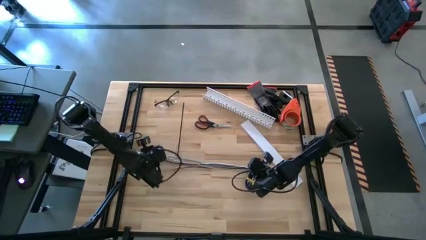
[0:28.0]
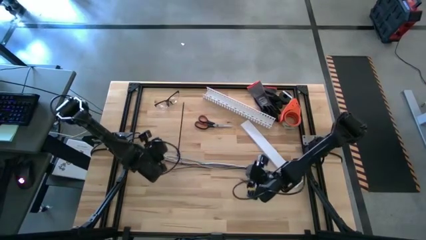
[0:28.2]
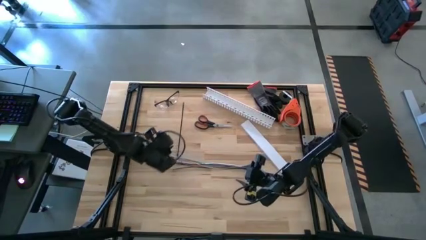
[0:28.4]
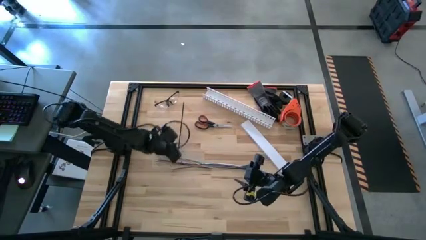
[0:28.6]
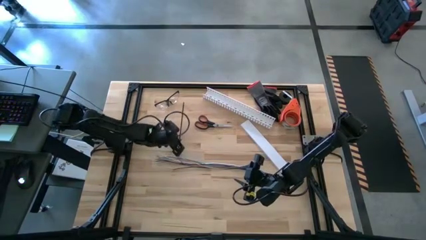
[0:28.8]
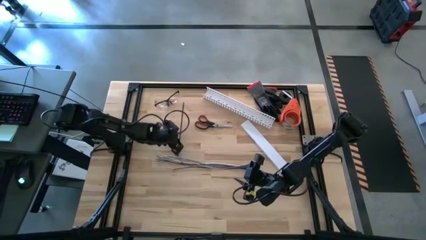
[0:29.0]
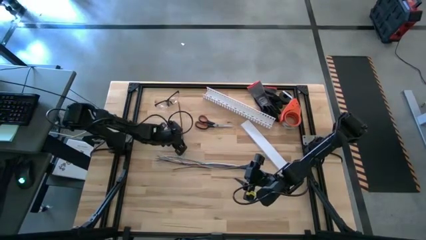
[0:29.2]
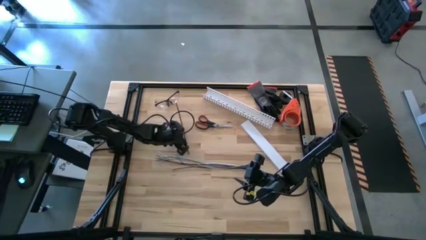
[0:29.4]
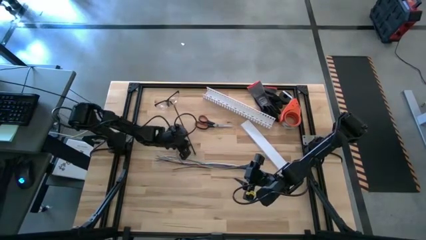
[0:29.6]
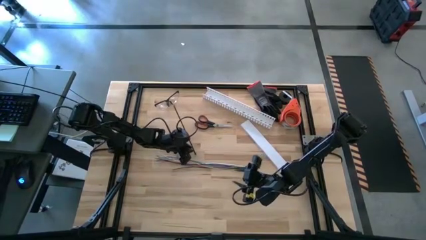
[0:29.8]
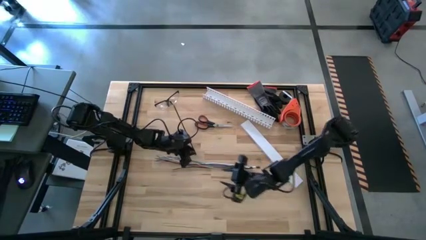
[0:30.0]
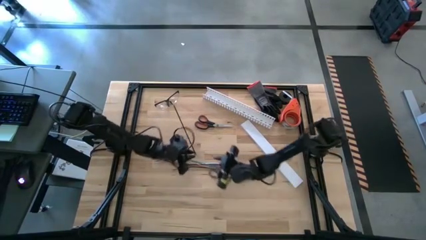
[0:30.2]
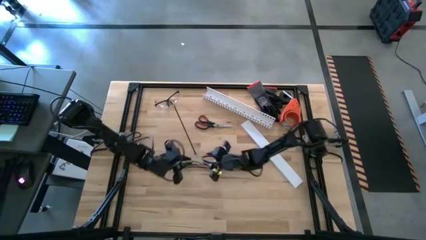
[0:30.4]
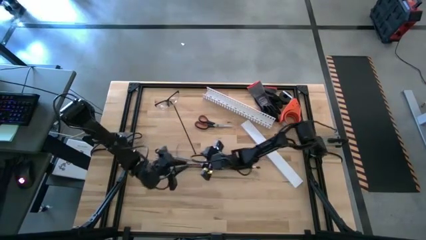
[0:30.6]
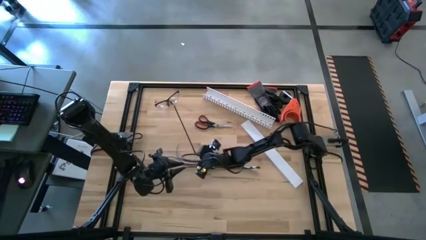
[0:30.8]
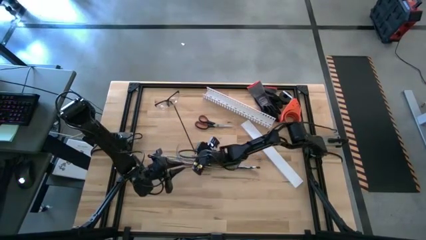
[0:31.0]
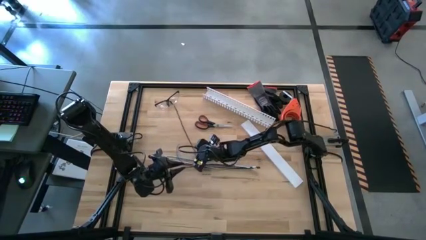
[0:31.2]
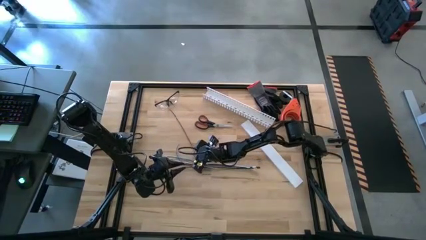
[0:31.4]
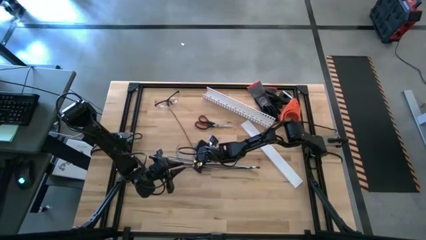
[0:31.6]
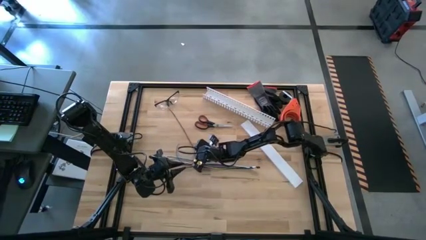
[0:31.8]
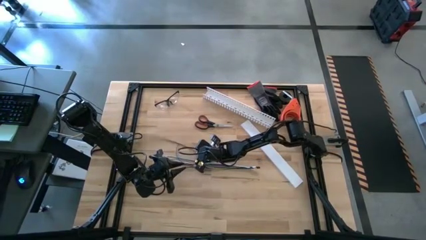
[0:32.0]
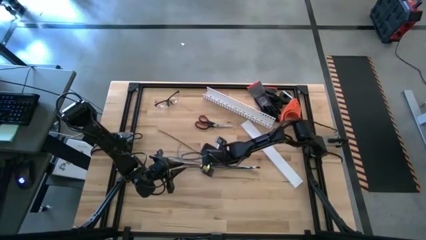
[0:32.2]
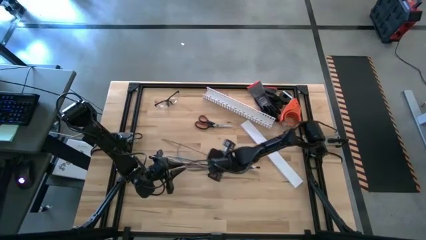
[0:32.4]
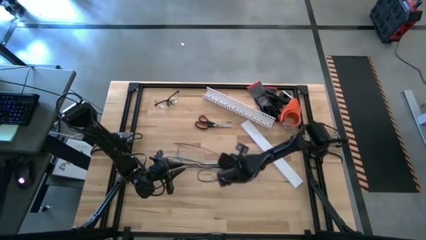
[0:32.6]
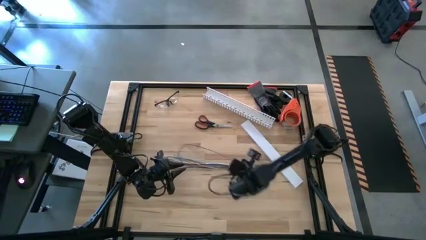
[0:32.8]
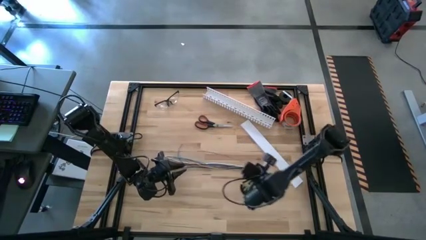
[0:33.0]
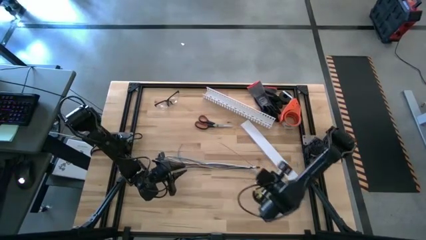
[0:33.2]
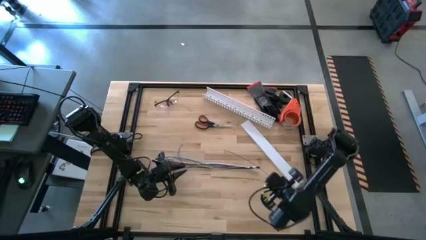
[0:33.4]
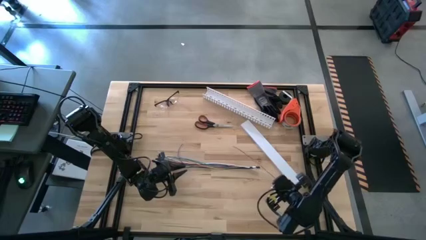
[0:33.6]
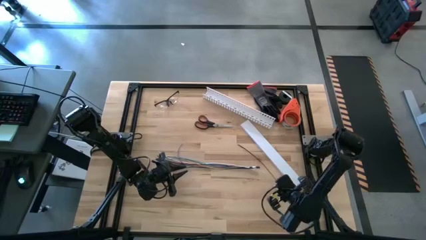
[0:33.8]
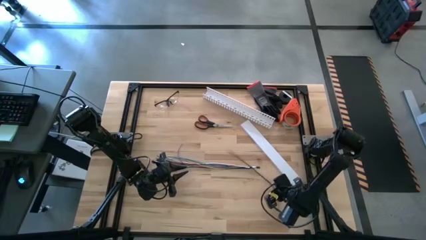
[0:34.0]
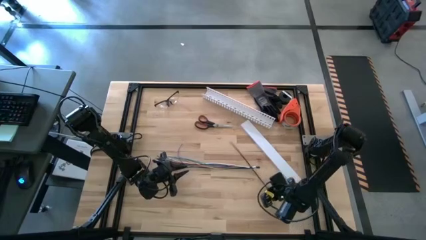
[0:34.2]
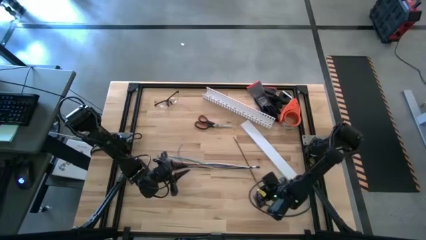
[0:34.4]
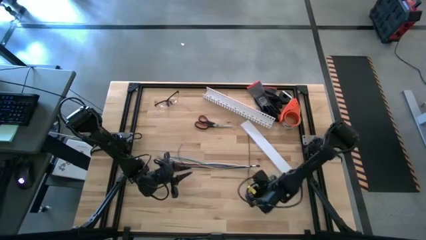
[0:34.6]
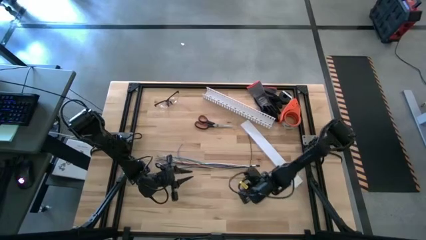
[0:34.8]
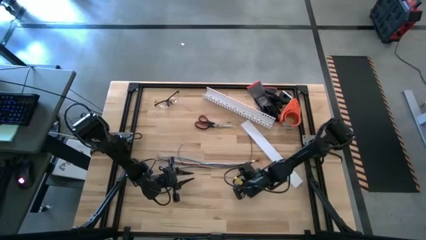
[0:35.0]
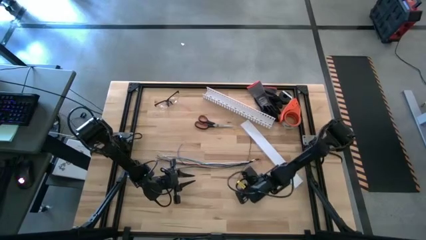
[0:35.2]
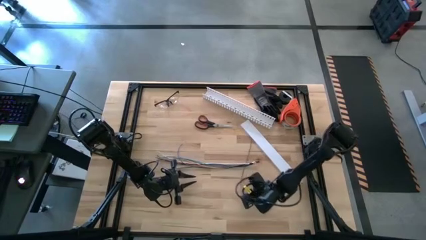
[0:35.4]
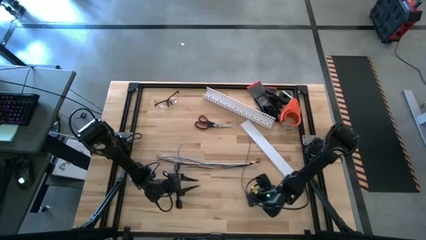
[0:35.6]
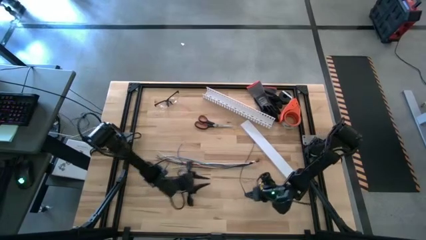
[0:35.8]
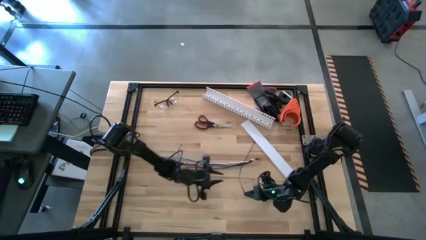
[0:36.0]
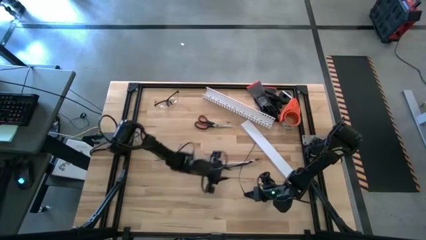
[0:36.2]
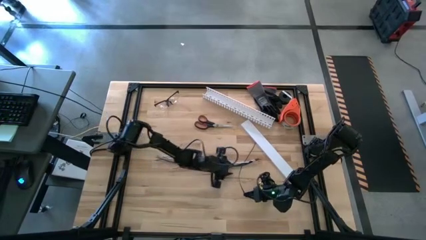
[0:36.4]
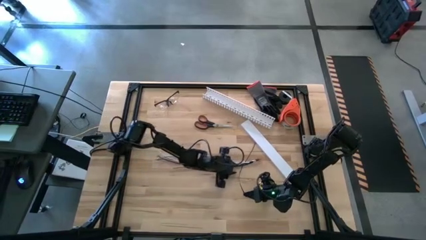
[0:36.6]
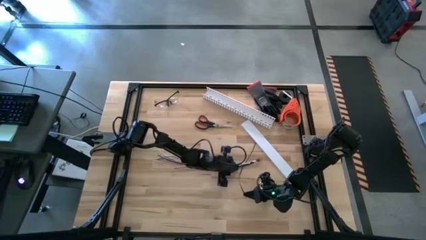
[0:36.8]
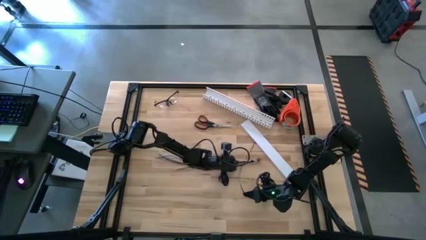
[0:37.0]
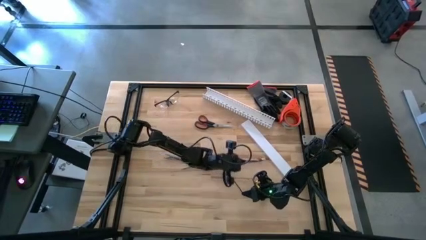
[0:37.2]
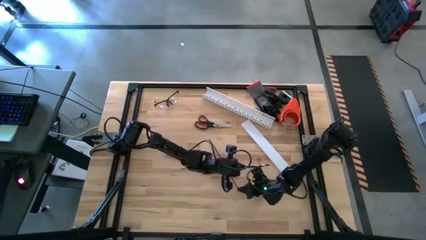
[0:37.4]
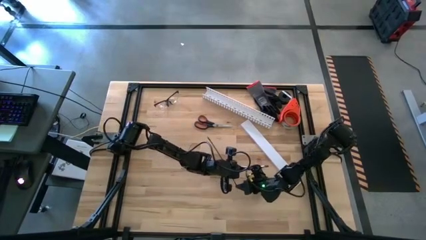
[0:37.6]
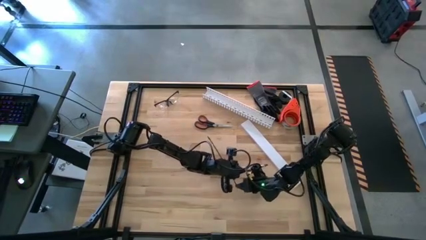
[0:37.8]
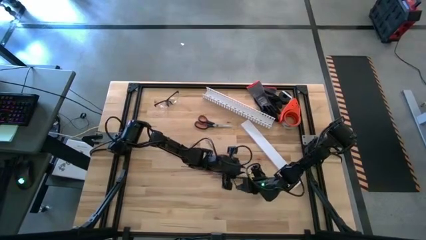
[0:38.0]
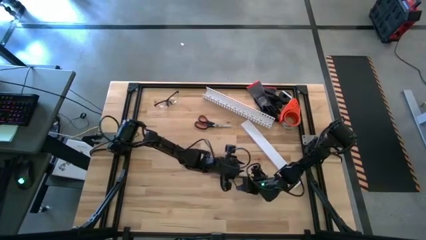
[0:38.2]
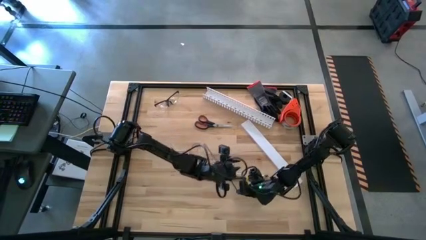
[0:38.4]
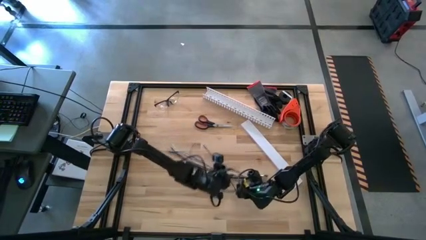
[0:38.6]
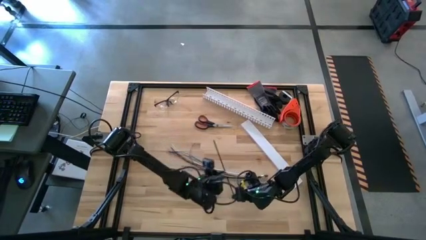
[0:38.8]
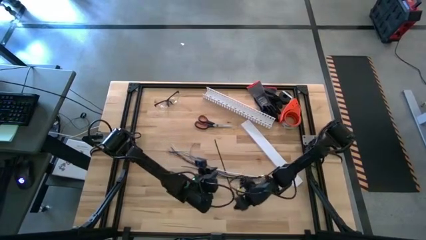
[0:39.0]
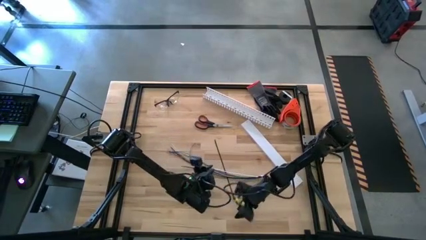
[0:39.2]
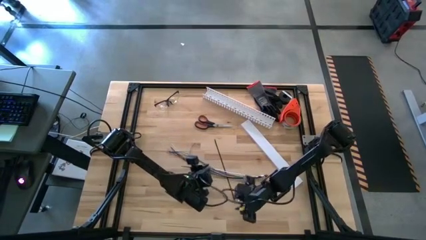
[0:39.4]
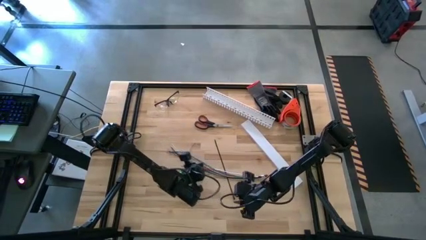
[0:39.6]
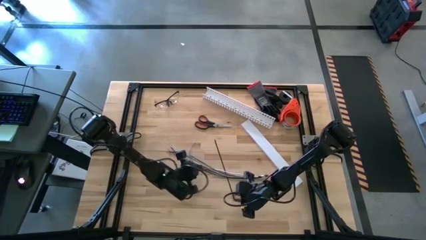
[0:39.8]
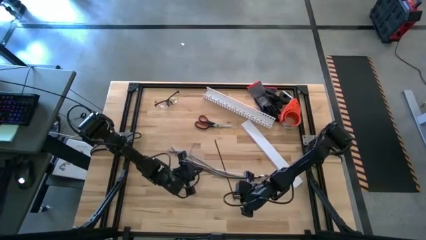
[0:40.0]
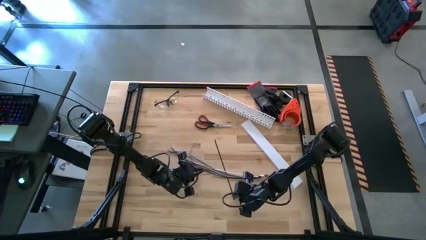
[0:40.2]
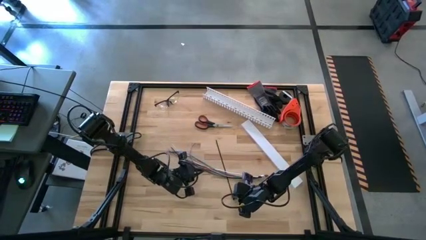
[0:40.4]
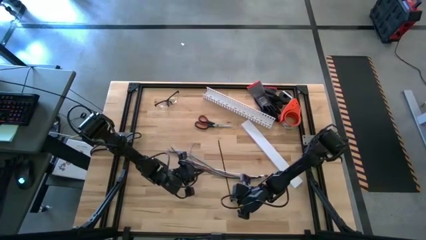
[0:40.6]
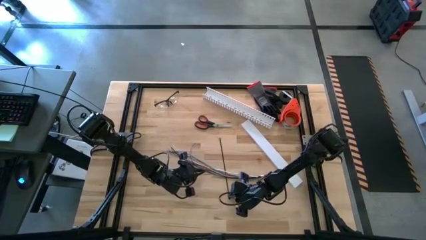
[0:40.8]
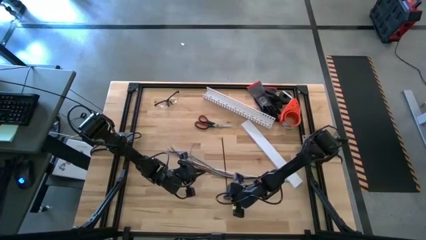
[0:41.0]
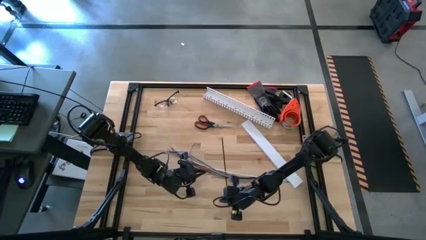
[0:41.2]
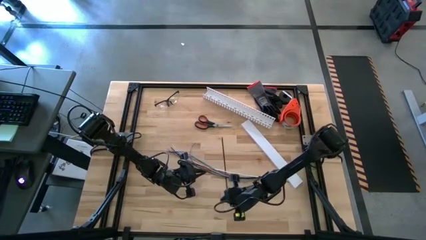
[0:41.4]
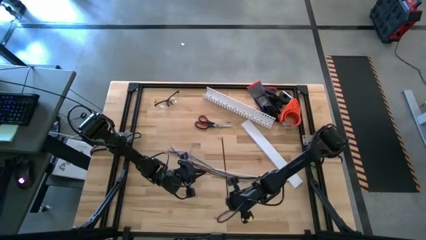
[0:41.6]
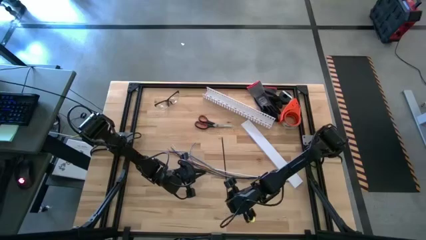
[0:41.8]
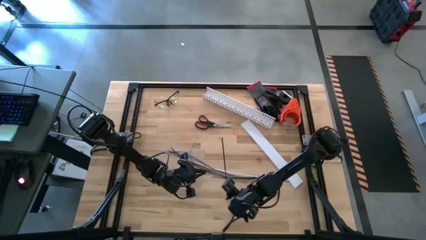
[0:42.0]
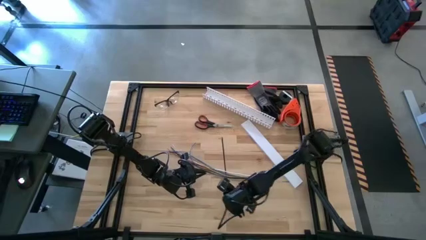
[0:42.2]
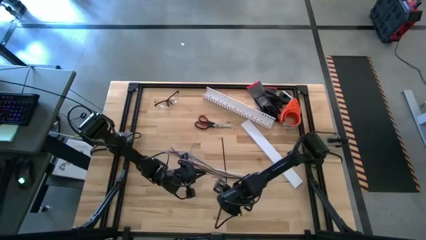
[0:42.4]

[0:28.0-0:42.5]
Task: Ziptie cables
Wrap the cable wires with a black ziptie

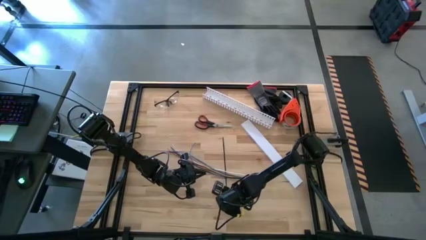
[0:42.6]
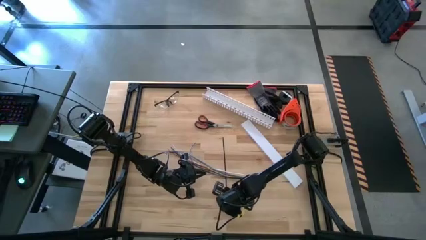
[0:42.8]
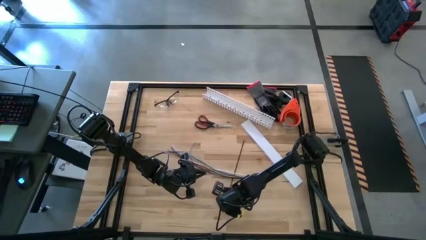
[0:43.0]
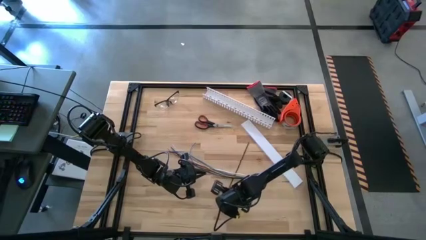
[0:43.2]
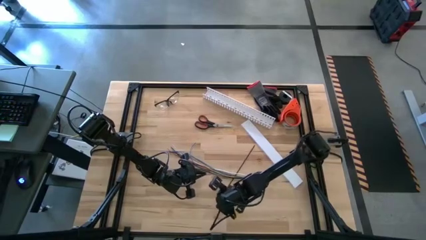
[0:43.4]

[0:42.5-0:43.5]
Wrap the cable wires with a black ziptie
